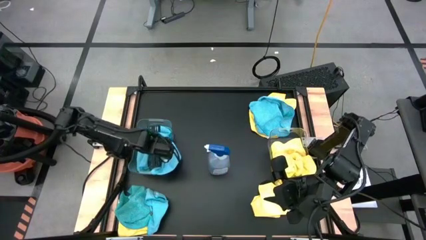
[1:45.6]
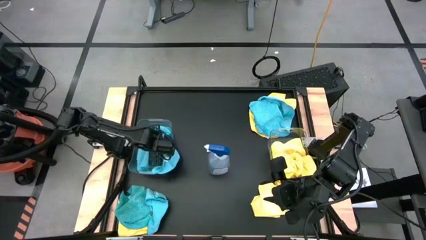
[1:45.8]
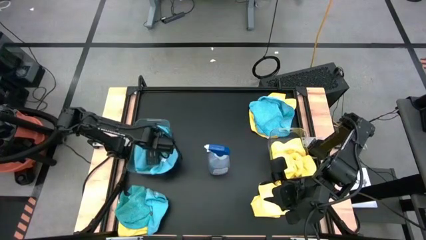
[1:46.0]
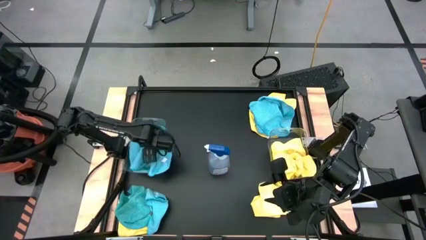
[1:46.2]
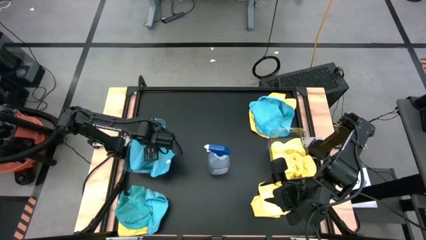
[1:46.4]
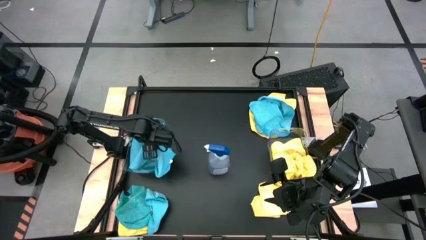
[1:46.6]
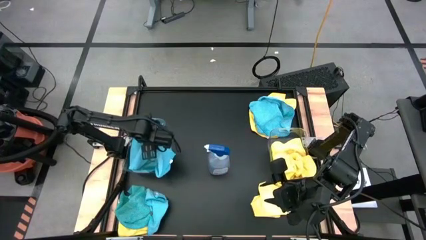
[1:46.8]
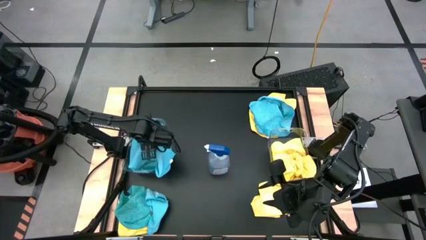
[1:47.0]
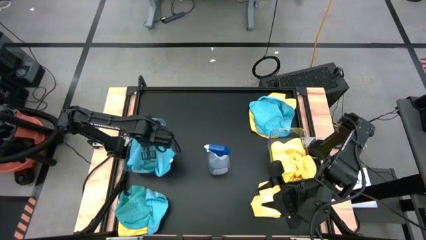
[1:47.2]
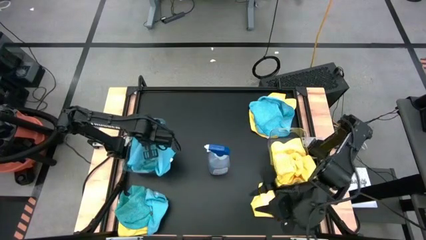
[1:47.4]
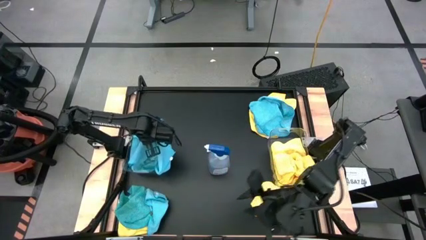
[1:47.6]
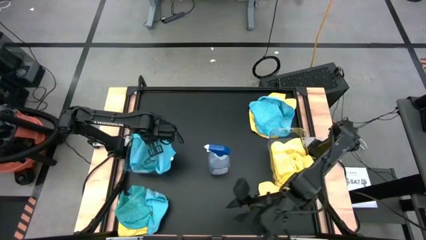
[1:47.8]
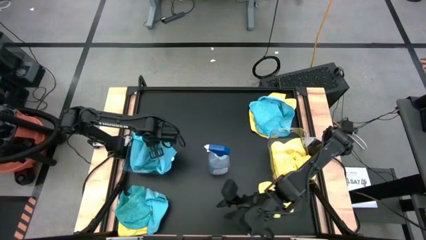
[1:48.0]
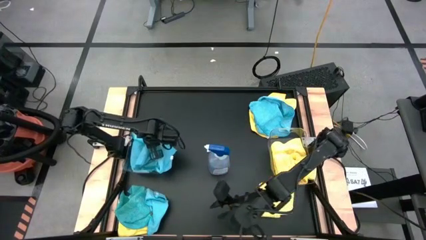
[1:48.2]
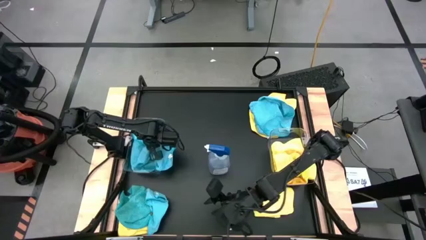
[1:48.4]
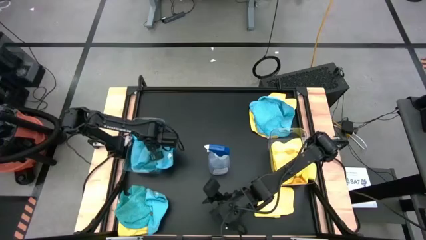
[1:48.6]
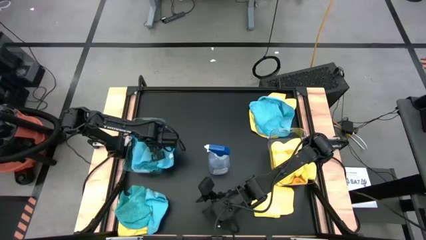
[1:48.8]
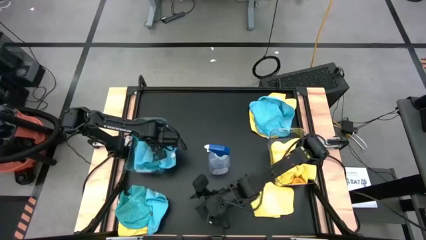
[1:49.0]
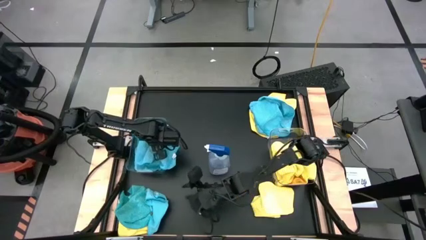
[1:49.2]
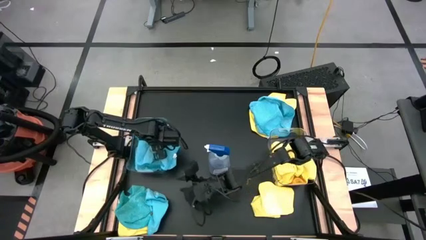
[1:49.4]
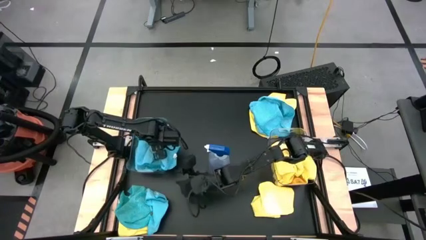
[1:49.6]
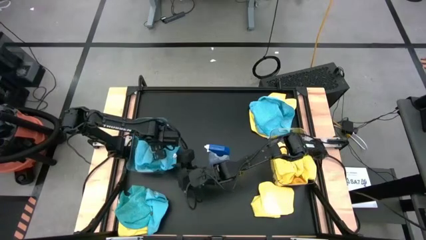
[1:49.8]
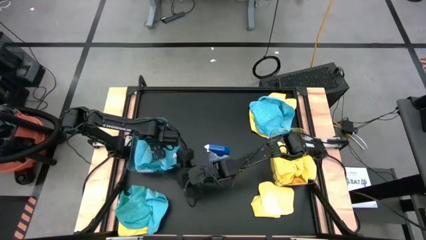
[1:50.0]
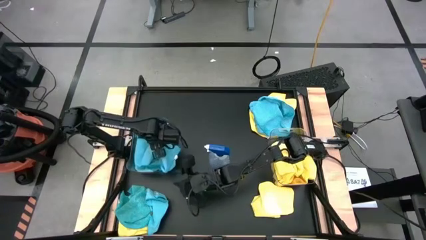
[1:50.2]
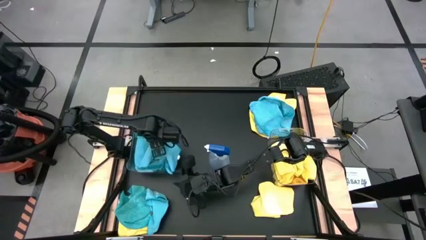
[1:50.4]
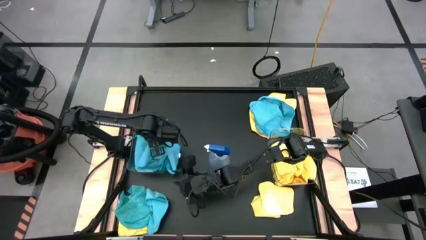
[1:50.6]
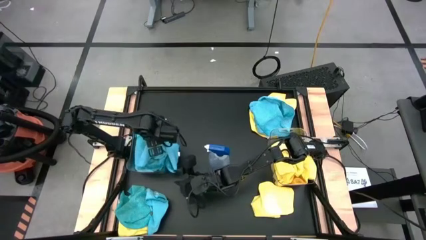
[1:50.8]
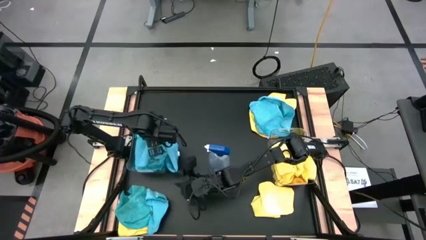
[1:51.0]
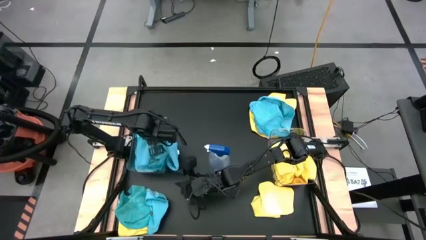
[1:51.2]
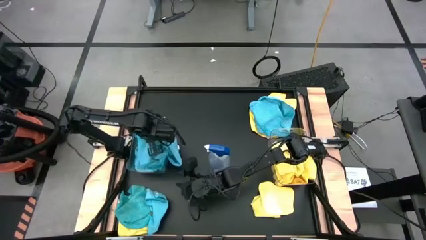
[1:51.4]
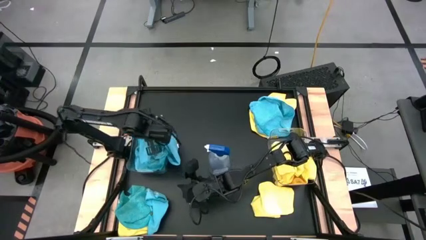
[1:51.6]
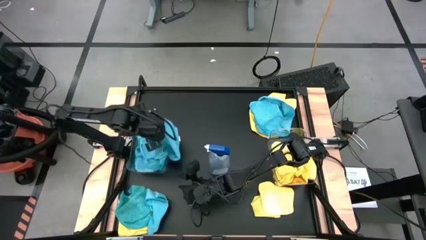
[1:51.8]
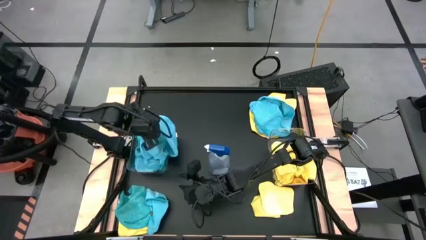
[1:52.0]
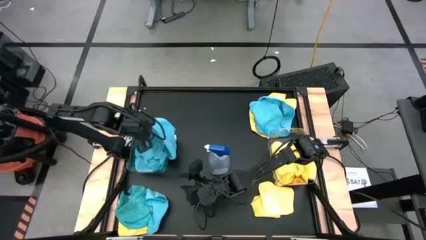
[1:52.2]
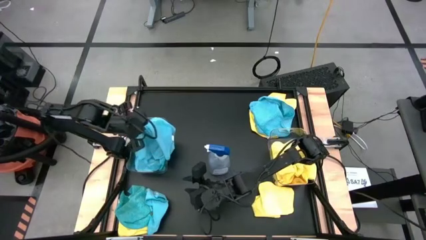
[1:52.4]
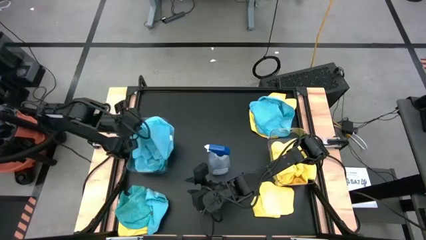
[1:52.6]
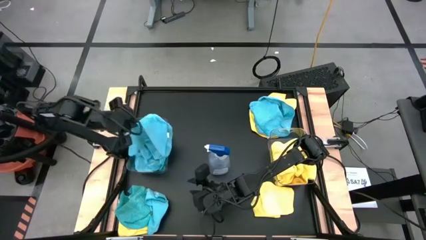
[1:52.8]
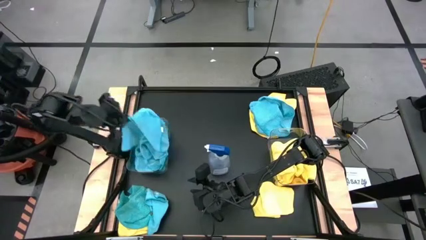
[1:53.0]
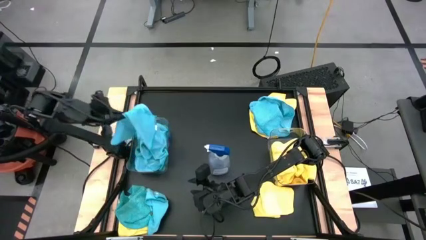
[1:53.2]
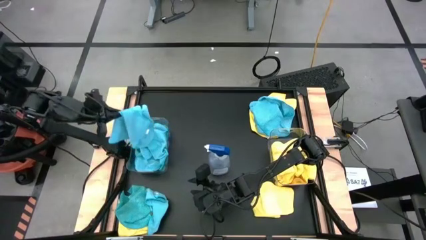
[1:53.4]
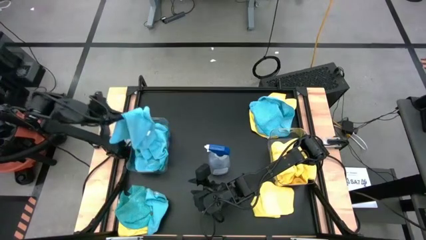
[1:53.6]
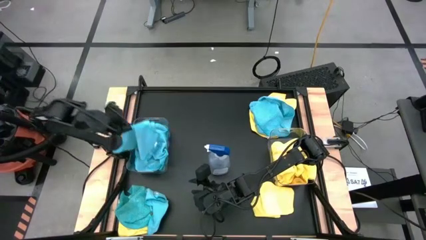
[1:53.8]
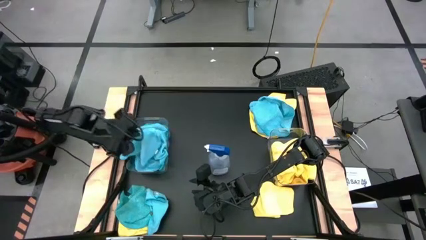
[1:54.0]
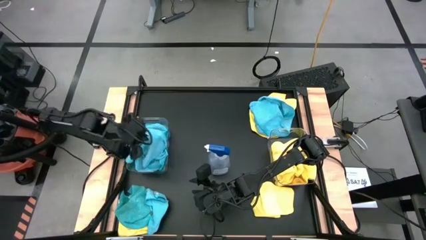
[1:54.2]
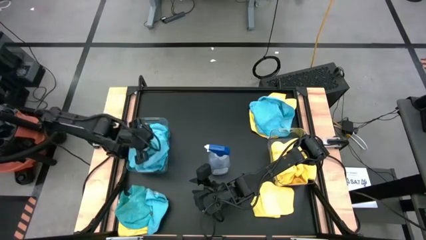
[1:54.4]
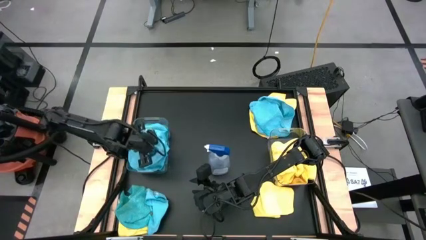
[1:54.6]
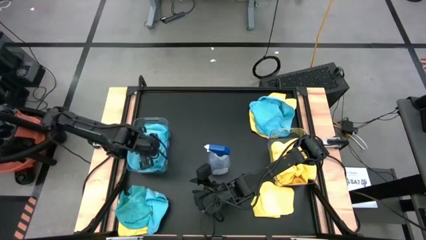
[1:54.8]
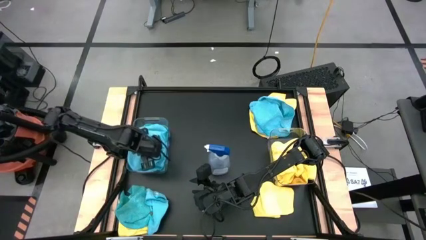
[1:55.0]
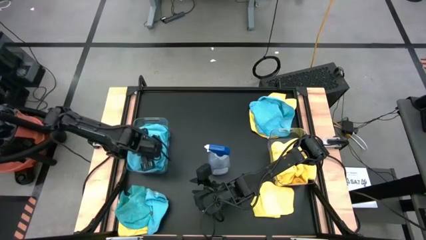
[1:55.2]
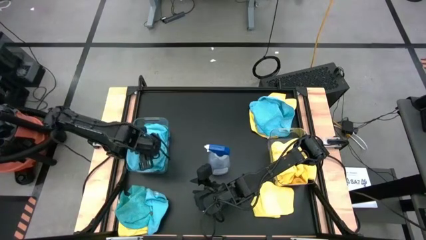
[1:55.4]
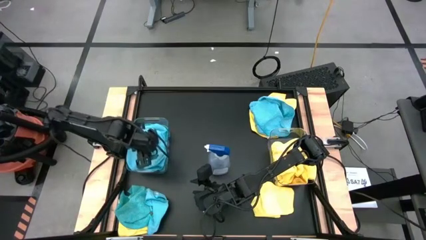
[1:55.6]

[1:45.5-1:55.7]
Task: Sort microfiber towel by color & place in baskets
Put the blue microfiber cloth into the left transparent bin

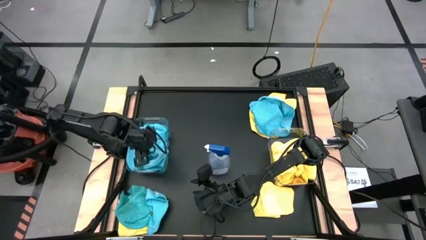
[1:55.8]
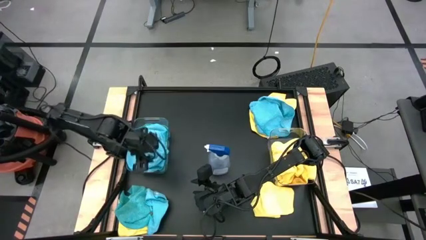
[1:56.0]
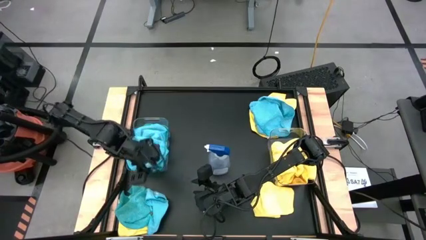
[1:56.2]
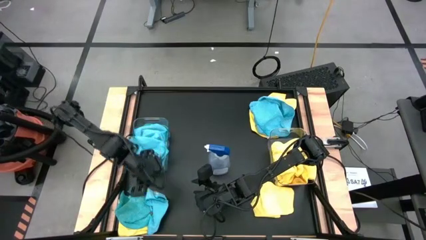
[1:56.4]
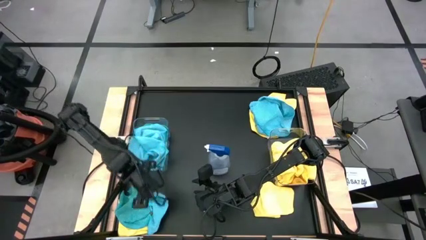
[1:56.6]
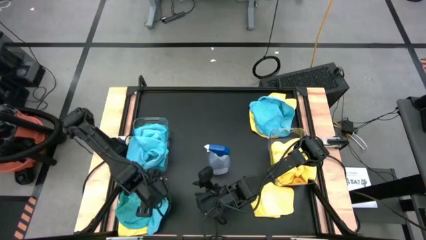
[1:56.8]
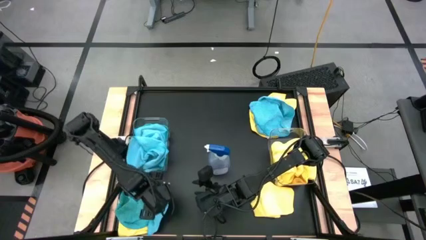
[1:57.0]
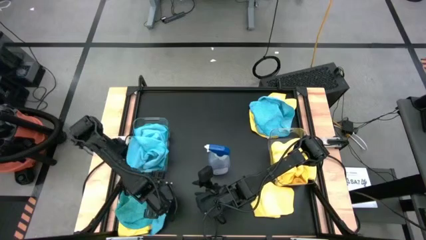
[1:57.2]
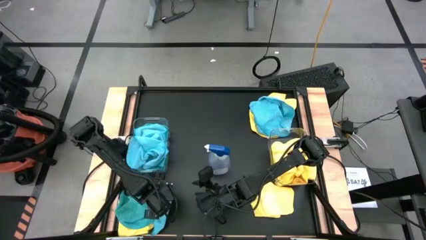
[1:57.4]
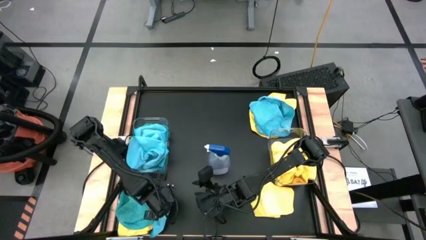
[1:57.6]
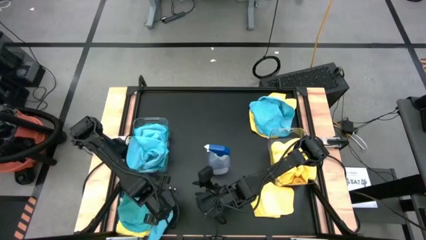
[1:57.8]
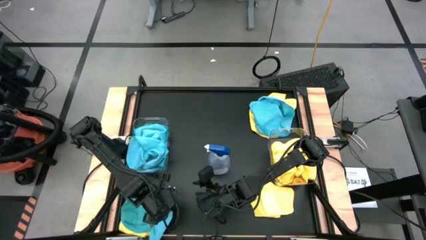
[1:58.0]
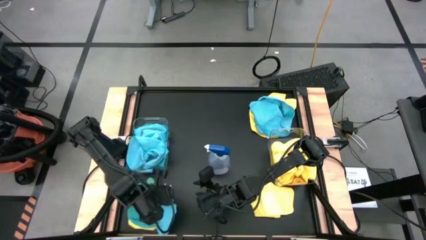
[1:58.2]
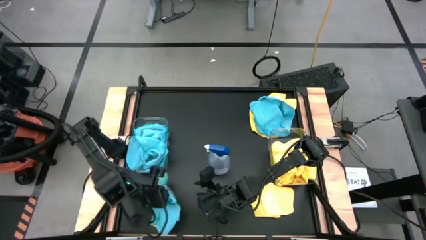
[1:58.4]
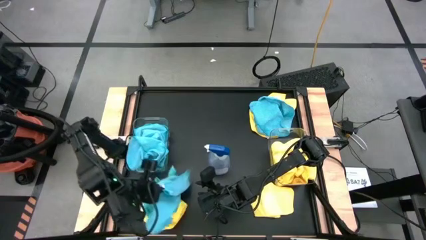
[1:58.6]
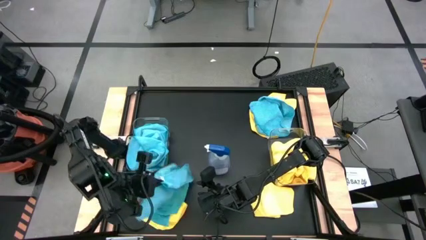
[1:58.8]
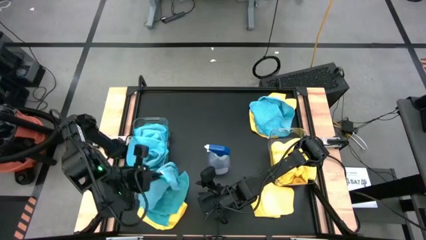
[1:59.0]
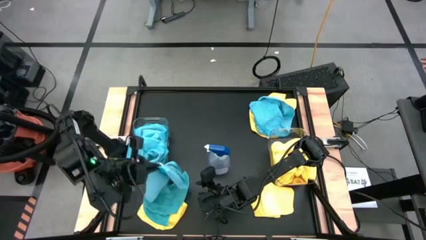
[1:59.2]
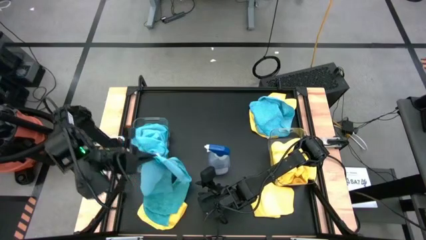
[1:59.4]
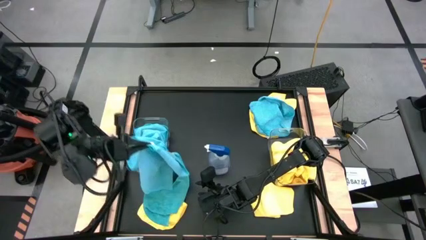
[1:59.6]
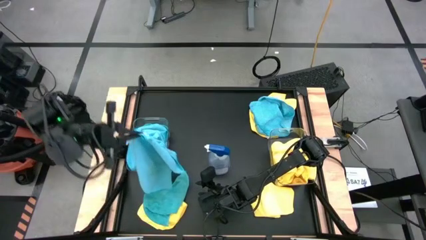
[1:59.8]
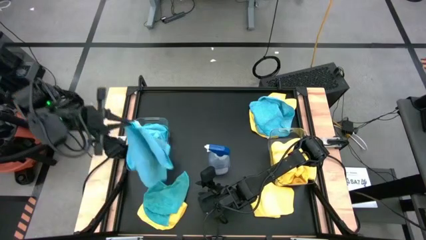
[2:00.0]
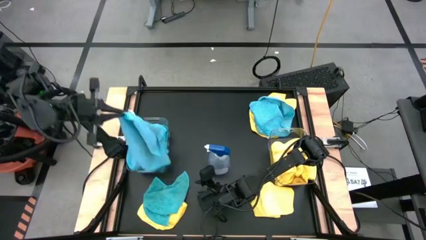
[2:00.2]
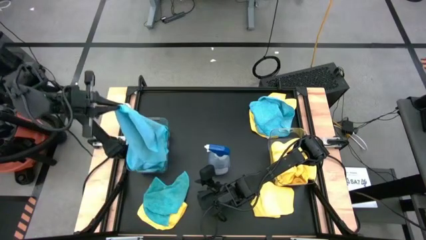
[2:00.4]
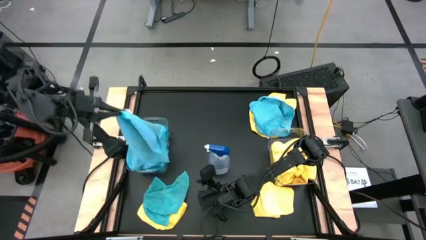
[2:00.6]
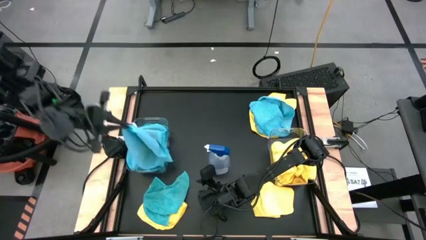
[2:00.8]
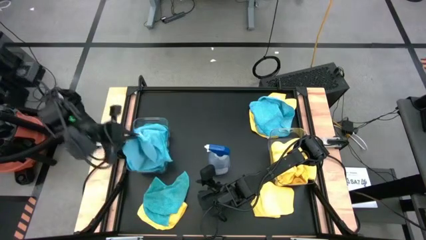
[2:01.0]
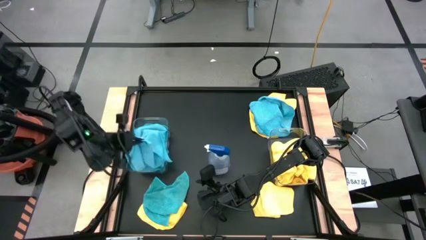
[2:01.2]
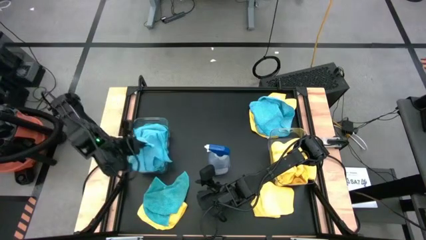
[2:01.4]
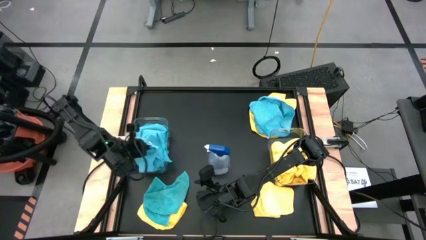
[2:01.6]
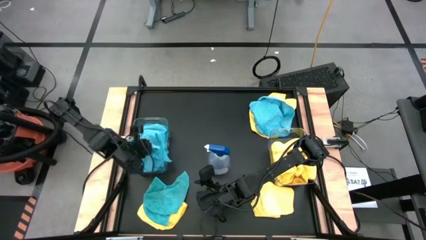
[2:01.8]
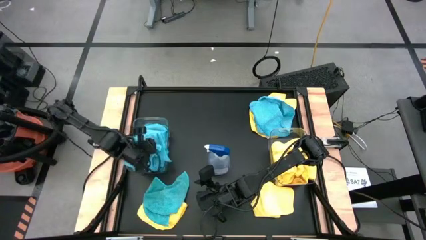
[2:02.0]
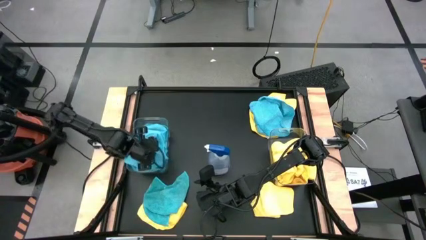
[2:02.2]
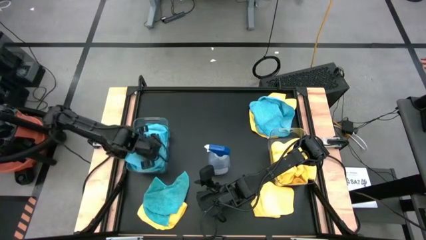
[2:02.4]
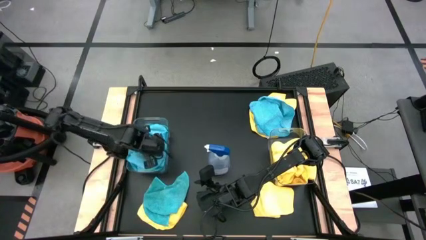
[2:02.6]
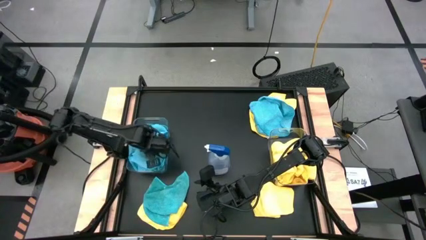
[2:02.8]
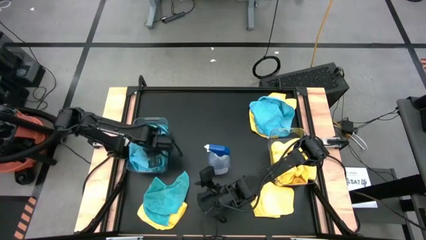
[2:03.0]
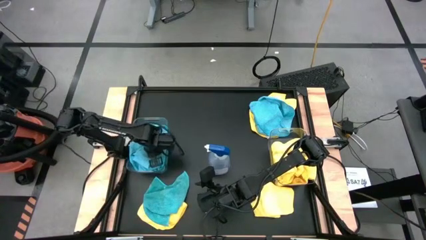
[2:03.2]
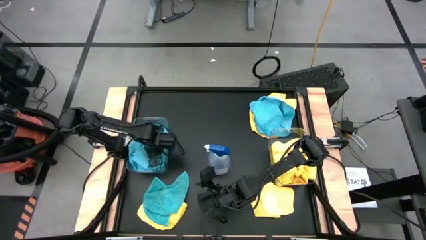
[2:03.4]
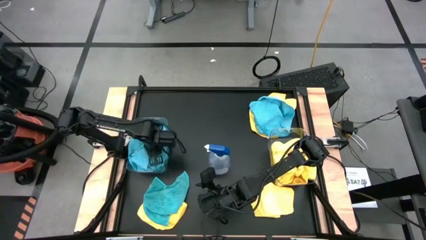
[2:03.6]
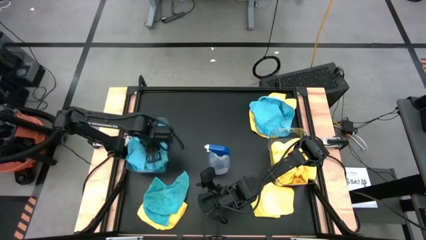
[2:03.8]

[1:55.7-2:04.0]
Put the blue microfiber cloth into the left transparent bin
